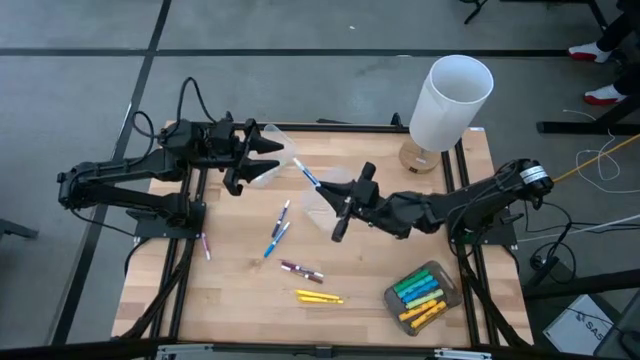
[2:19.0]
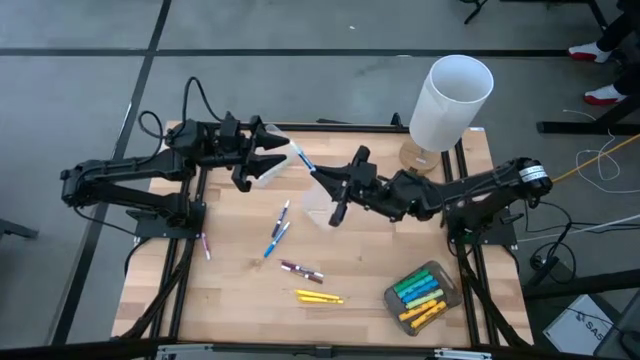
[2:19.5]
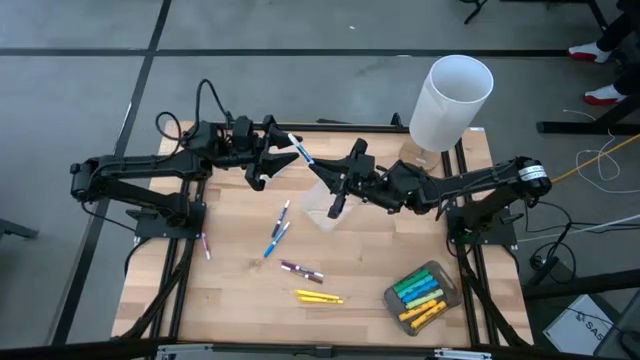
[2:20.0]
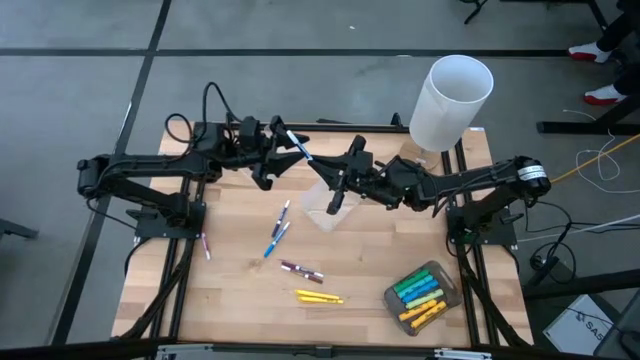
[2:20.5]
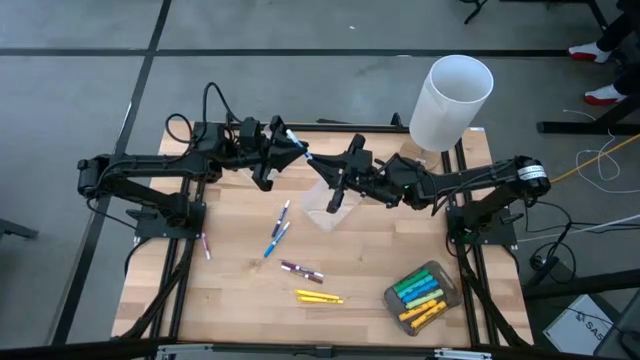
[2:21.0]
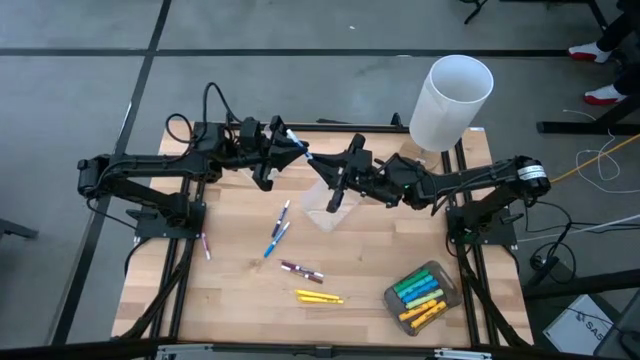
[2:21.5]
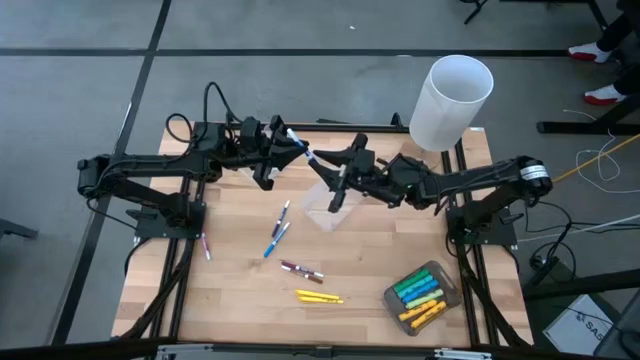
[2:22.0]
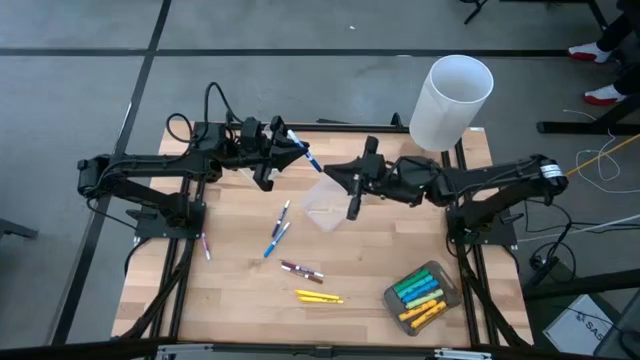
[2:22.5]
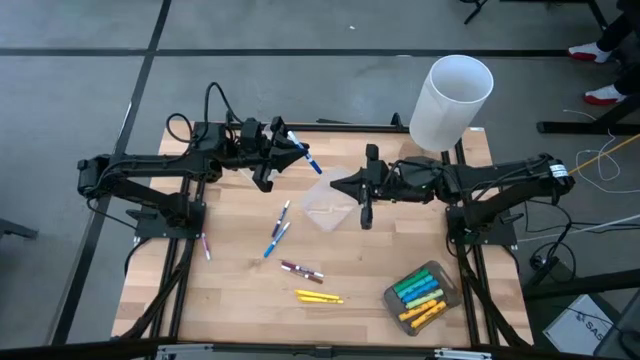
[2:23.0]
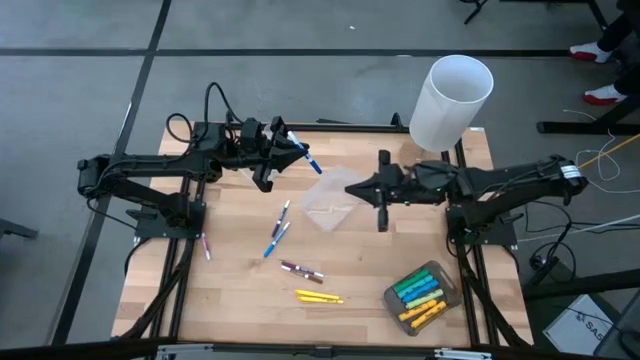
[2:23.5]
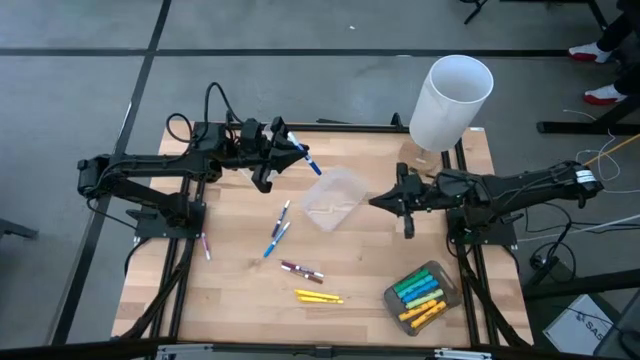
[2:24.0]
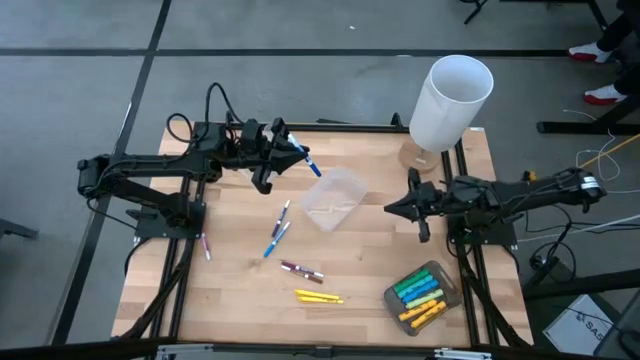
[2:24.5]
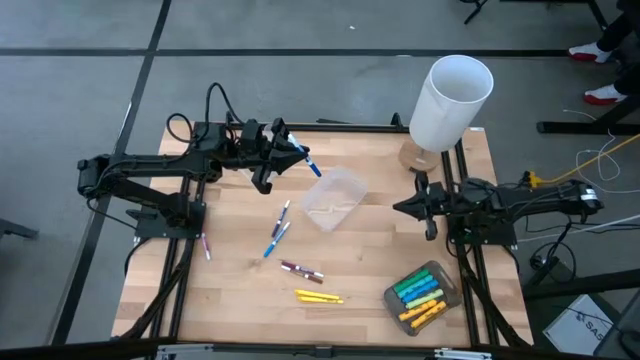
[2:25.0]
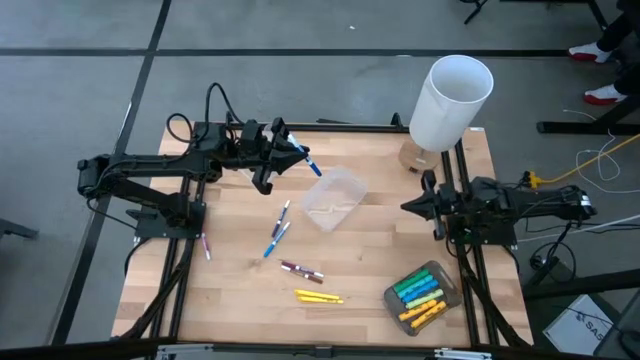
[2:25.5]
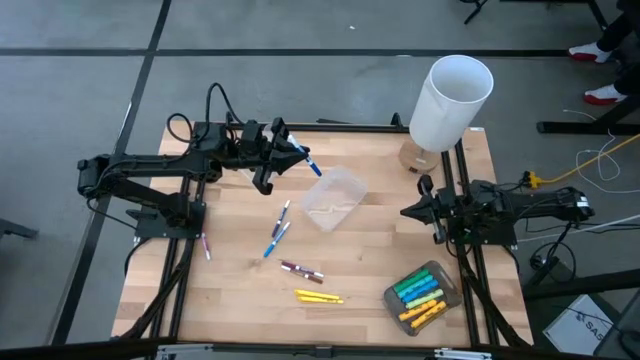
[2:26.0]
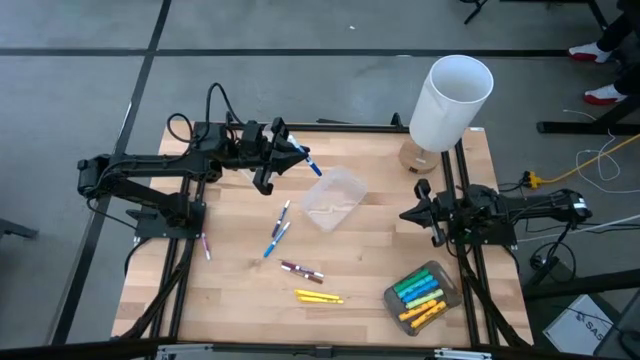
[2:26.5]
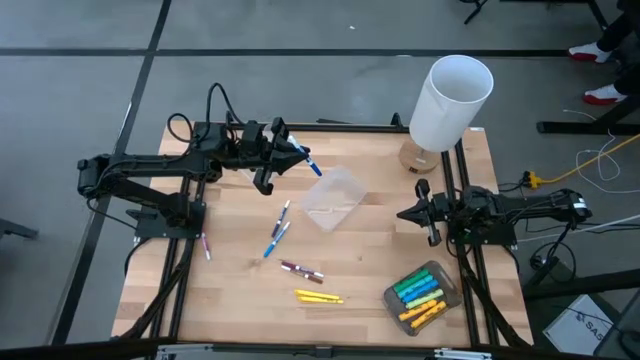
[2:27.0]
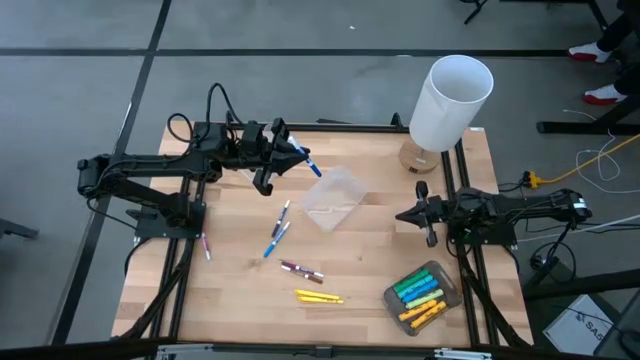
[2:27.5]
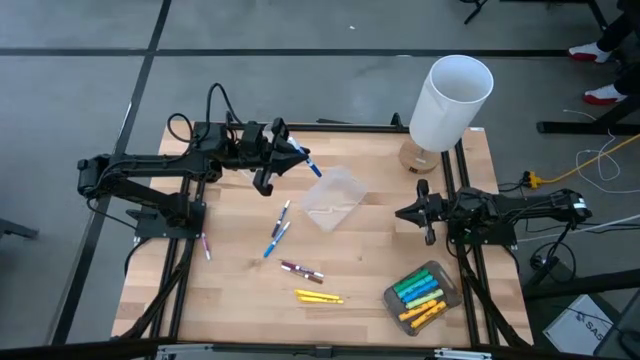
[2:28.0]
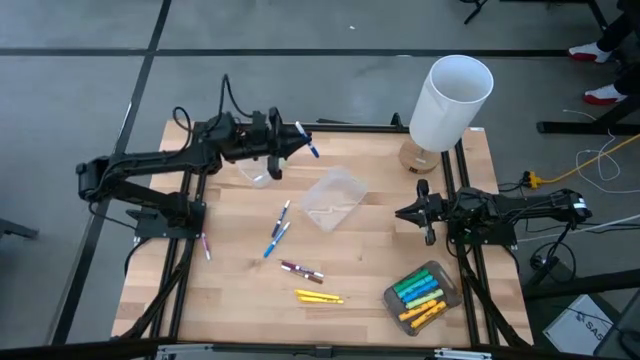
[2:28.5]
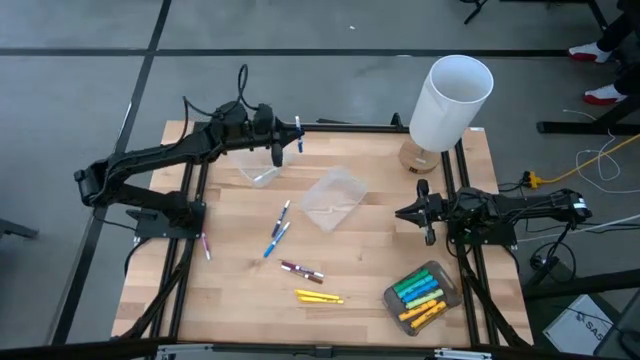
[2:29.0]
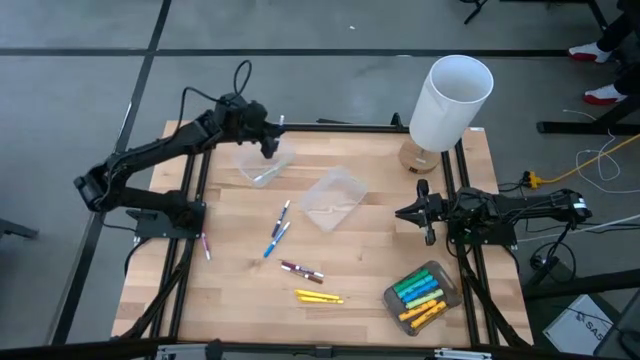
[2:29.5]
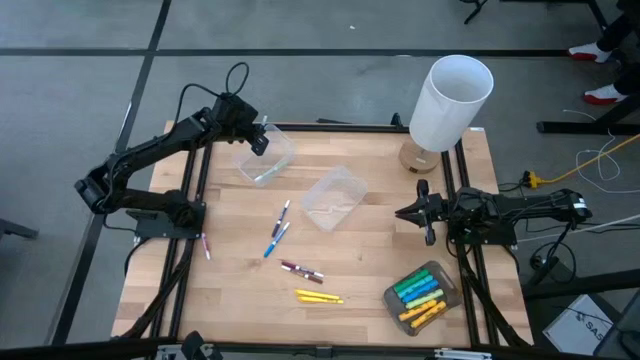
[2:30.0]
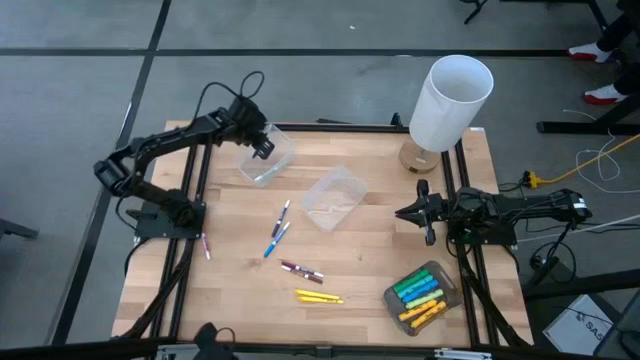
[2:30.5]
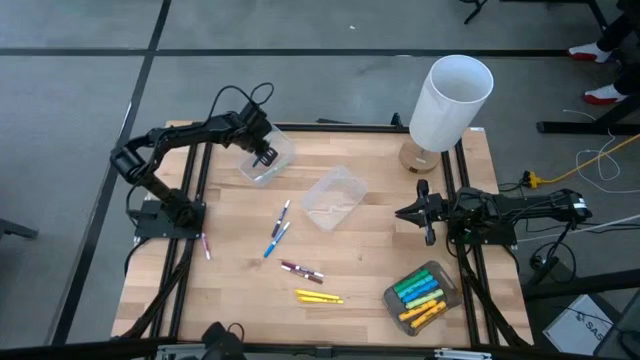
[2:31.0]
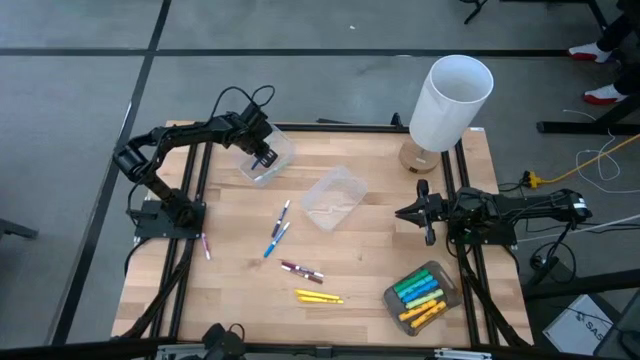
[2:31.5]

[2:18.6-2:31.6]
Task: Pick & Place Markers
Put the right blue marker into the transparent bin

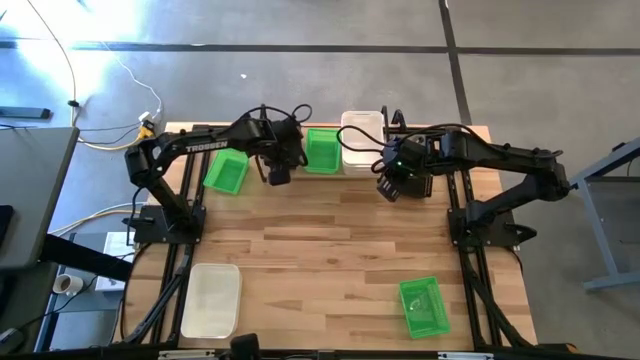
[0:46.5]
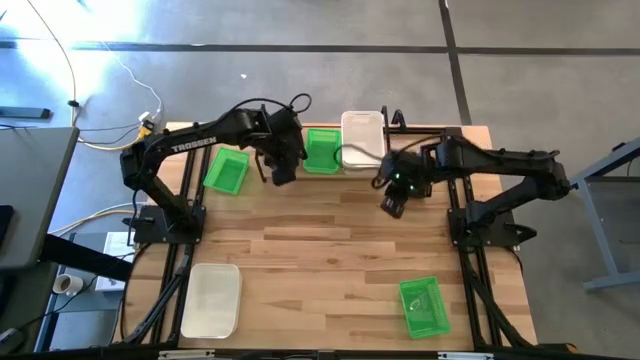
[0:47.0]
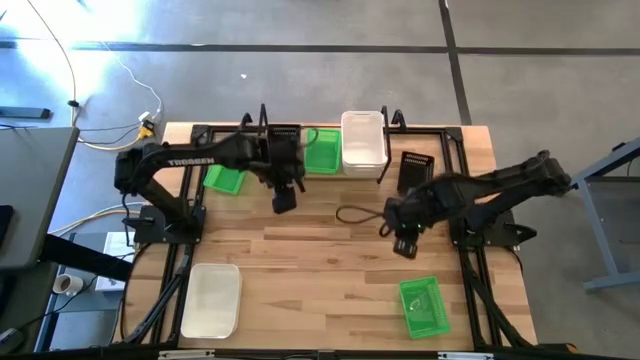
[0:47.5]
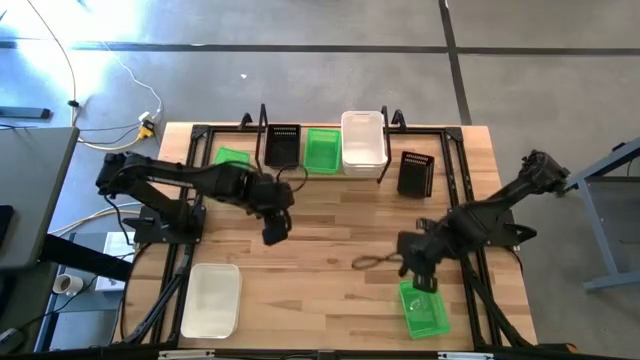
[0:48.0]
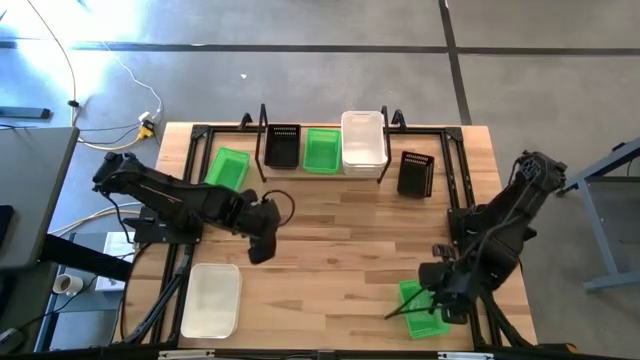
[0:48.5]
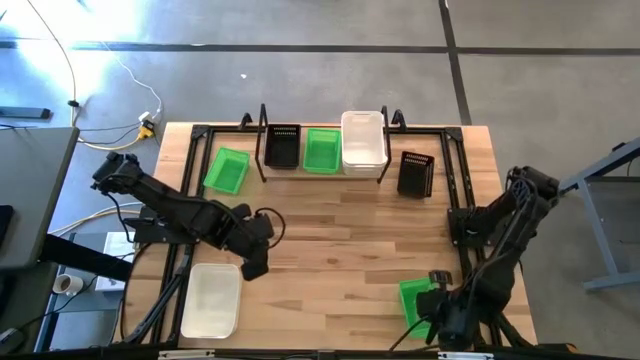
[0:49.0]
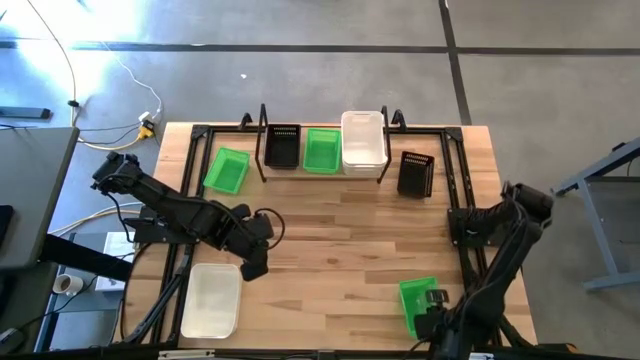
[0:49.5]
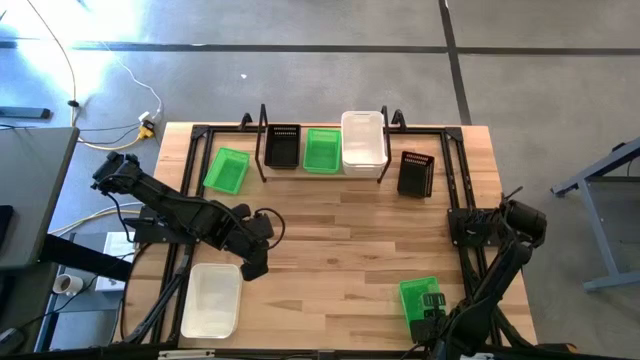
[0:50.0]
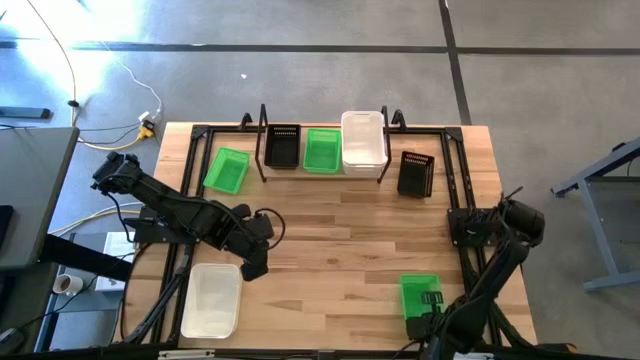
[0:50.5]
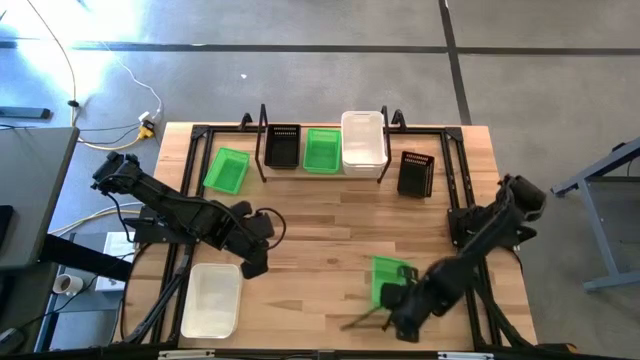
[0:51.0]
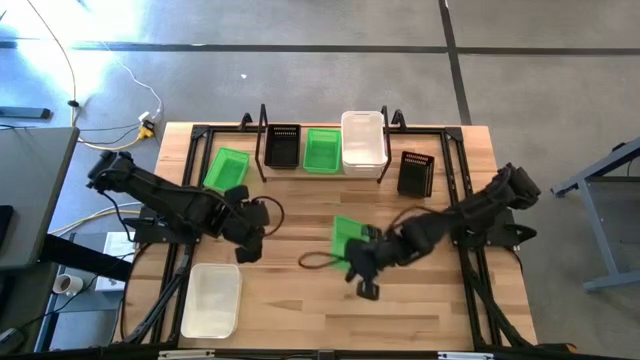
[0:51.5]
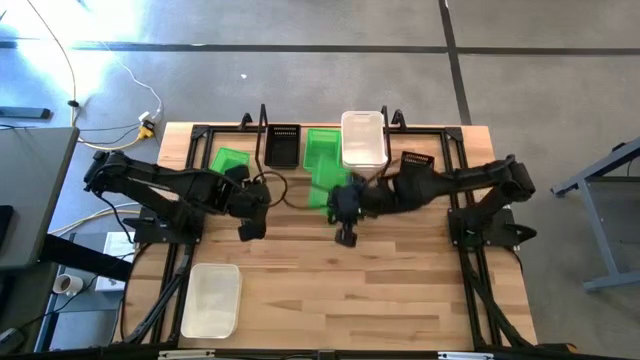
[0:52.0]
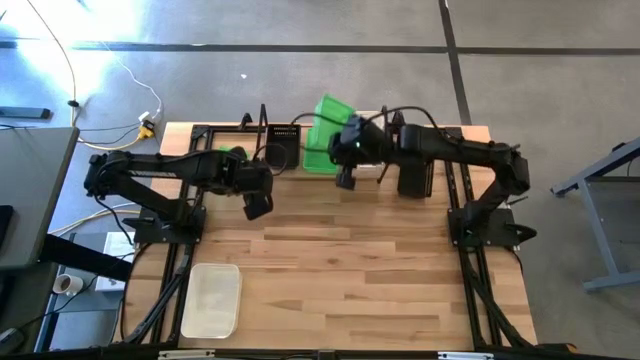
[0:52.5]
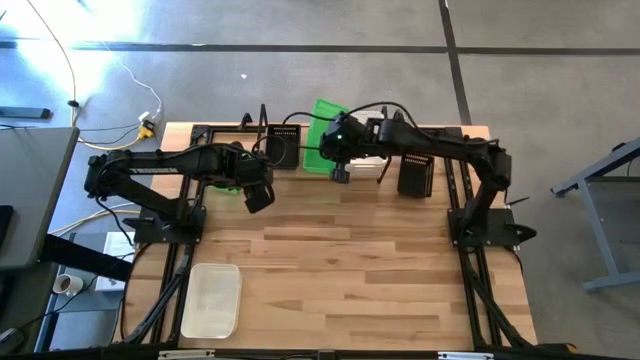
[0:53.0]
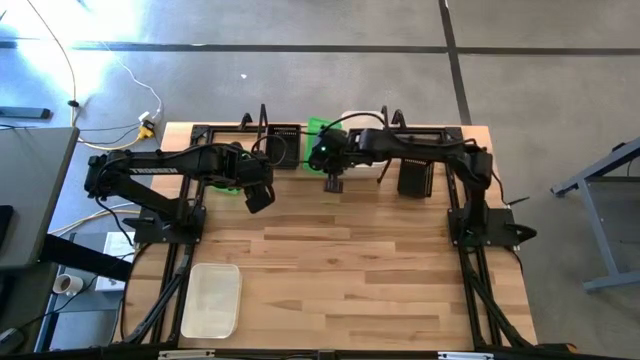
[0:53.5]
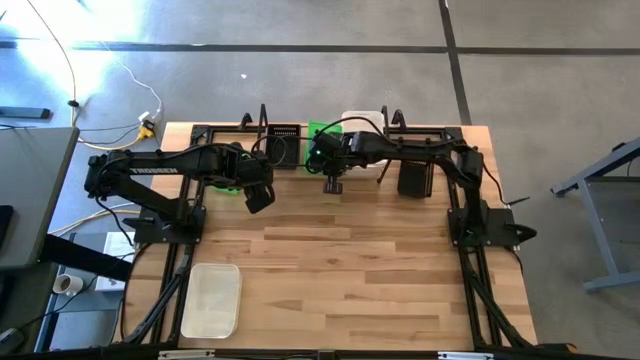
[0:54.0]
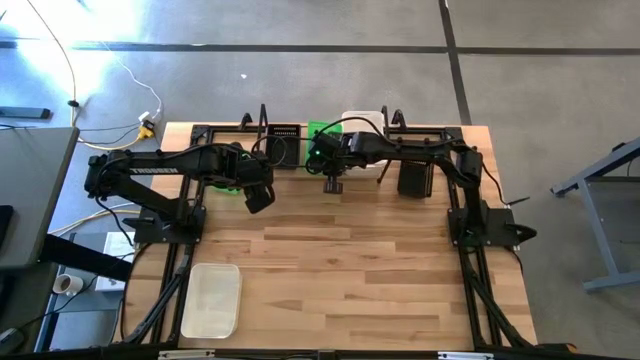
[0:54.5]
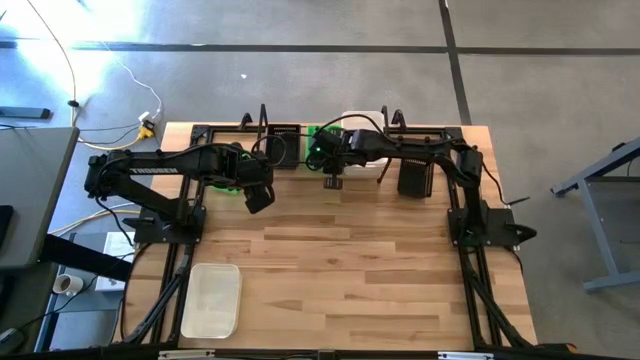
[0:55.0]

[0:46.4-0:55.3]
Task: Stack baskets on shelf by color
Stack the bottom green bin on the green bin on the shelf
